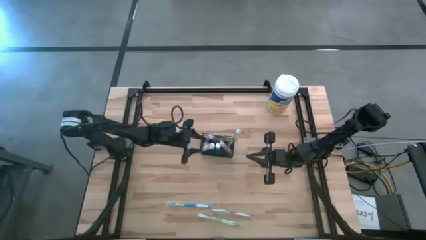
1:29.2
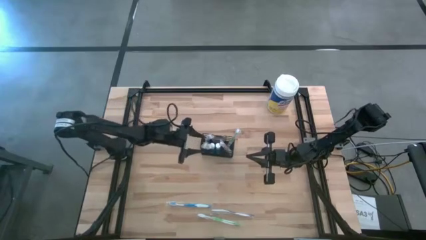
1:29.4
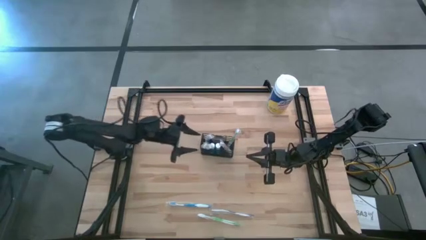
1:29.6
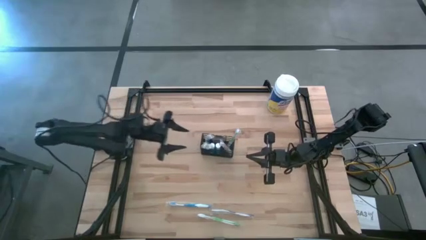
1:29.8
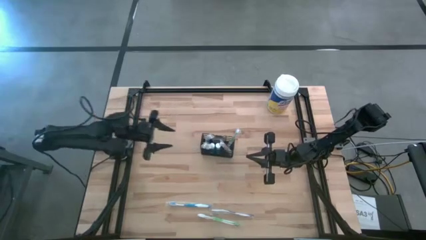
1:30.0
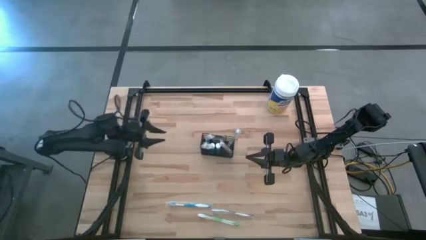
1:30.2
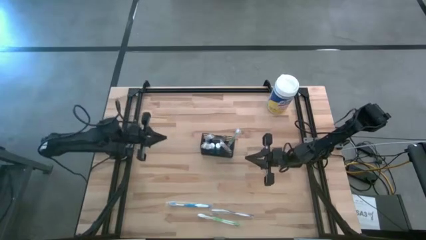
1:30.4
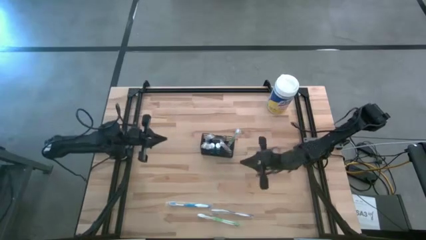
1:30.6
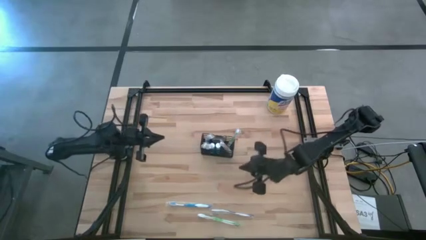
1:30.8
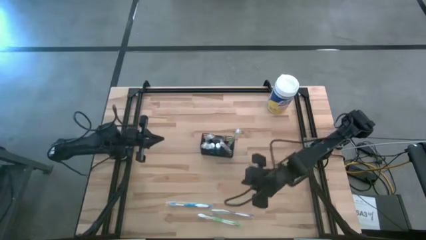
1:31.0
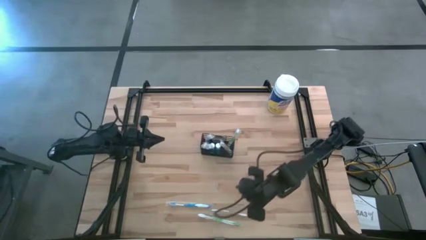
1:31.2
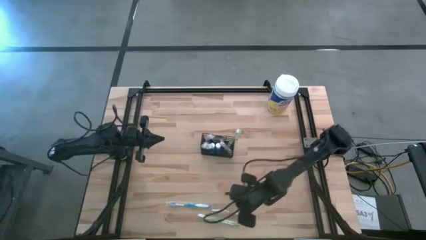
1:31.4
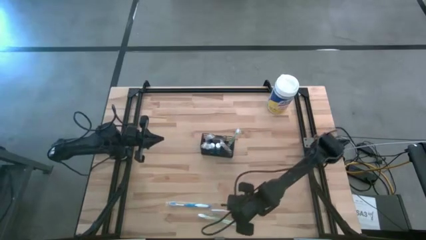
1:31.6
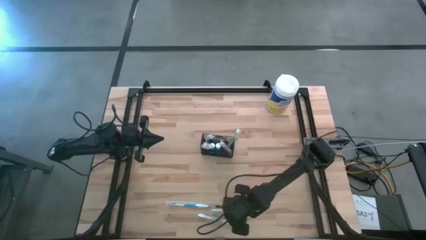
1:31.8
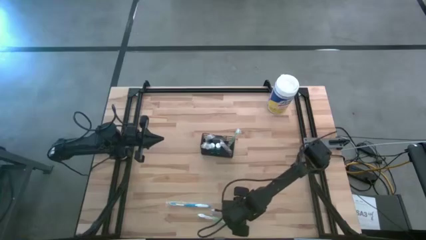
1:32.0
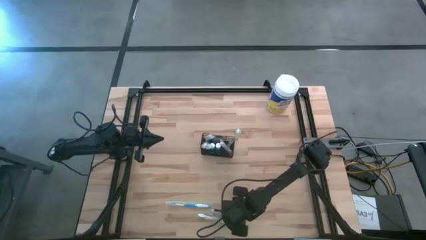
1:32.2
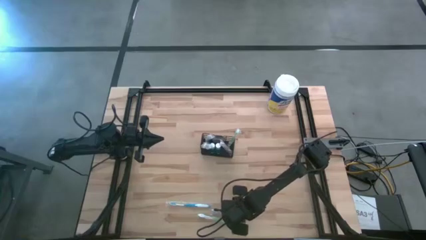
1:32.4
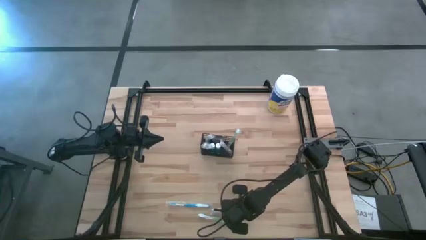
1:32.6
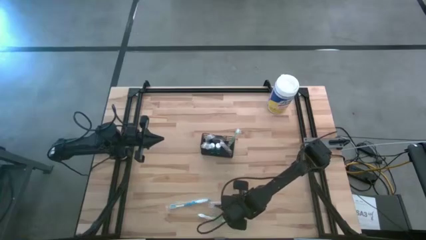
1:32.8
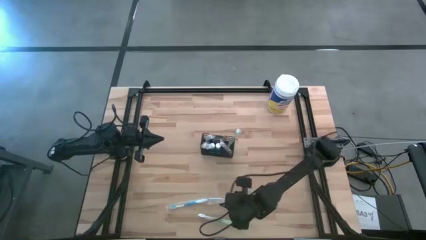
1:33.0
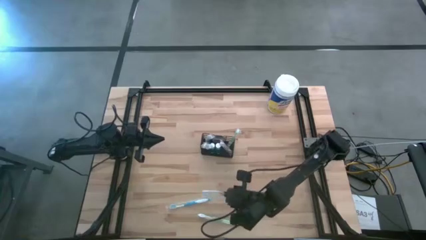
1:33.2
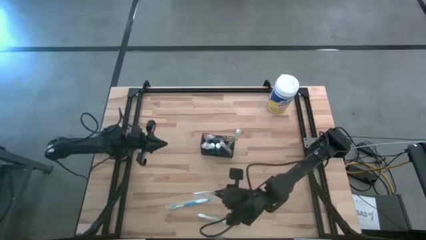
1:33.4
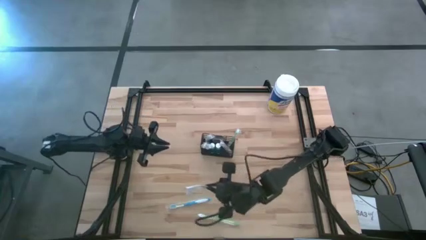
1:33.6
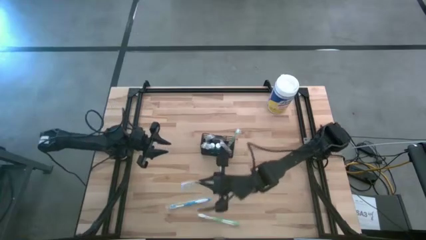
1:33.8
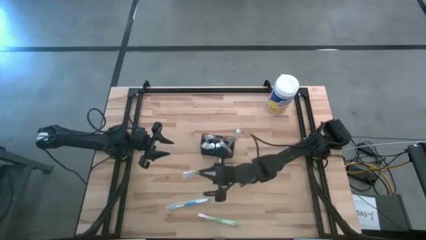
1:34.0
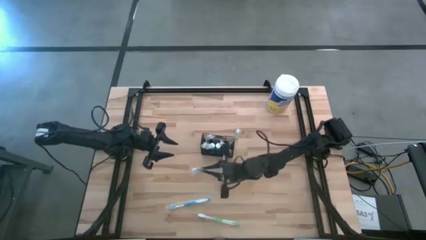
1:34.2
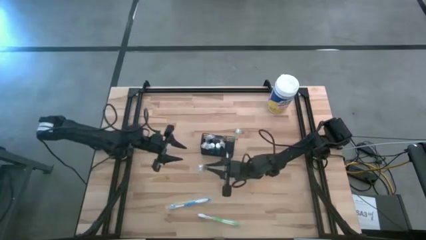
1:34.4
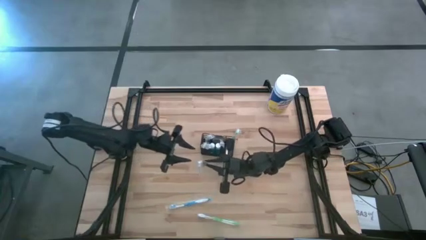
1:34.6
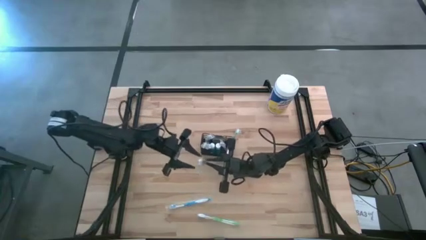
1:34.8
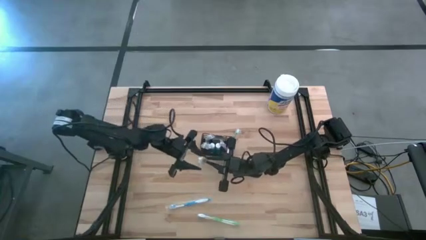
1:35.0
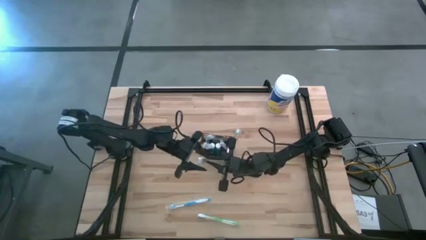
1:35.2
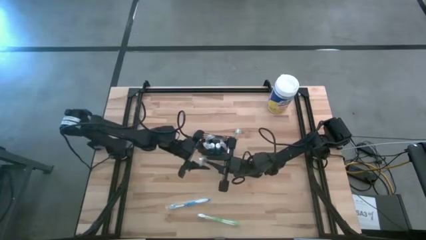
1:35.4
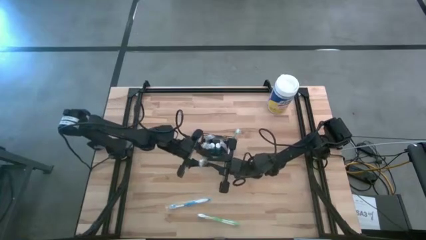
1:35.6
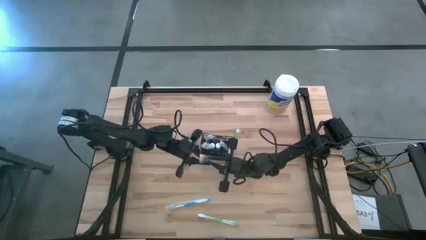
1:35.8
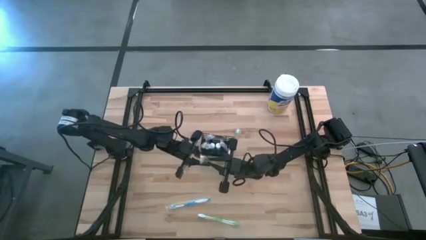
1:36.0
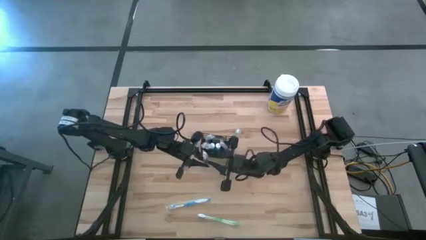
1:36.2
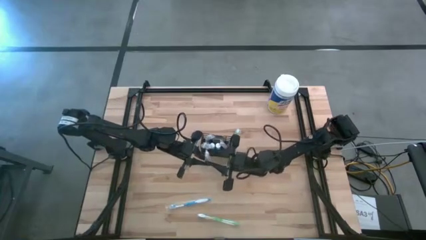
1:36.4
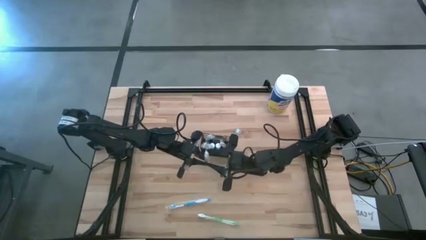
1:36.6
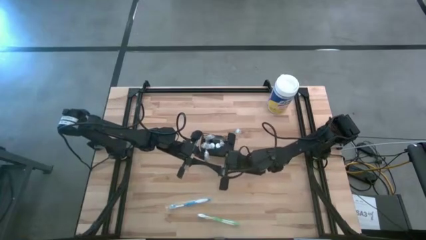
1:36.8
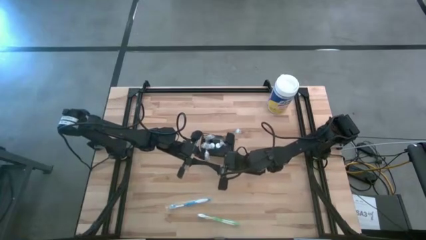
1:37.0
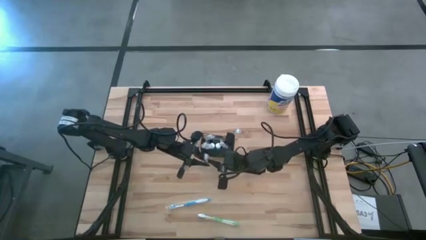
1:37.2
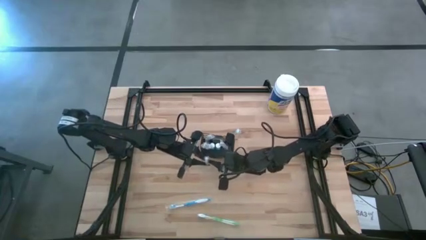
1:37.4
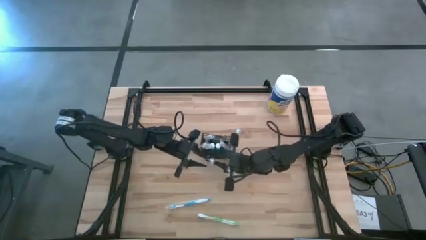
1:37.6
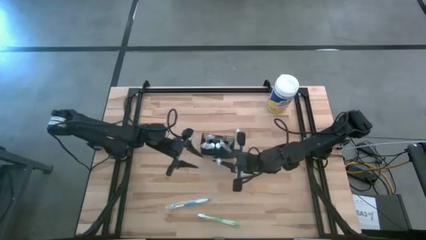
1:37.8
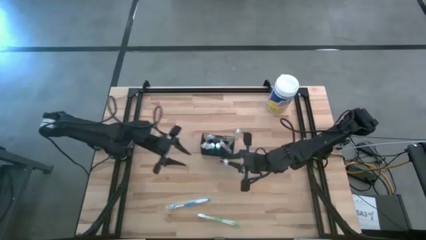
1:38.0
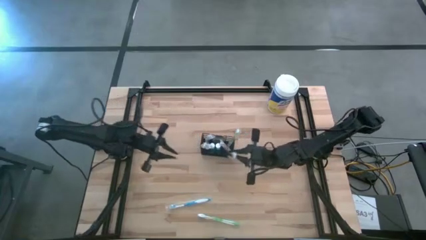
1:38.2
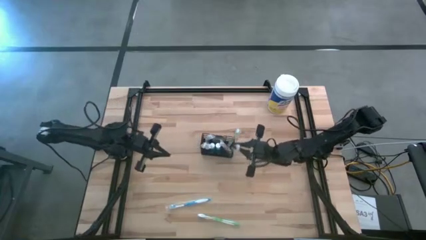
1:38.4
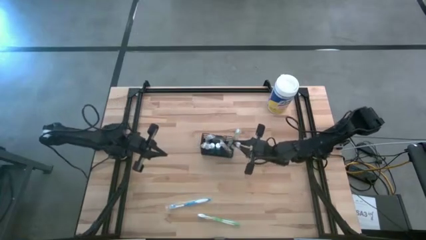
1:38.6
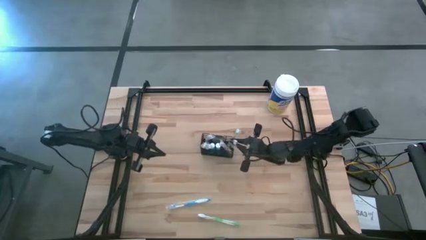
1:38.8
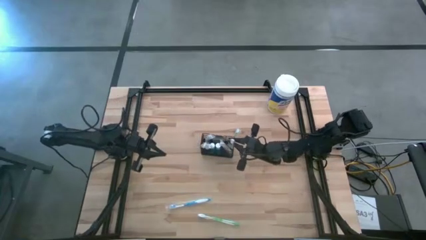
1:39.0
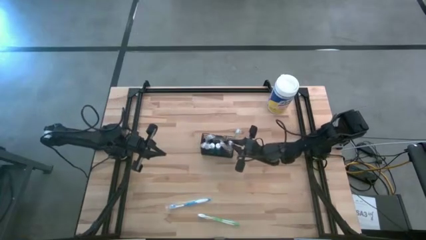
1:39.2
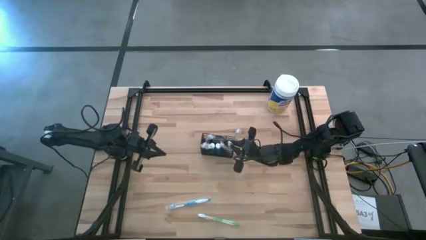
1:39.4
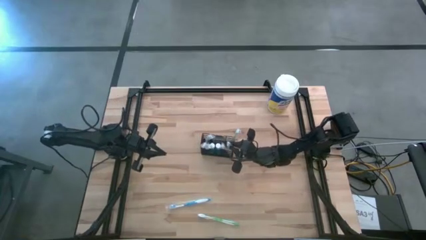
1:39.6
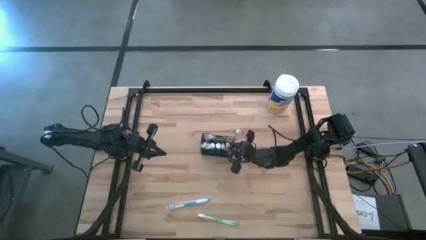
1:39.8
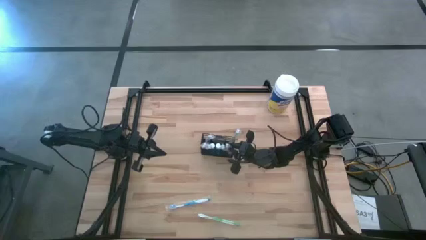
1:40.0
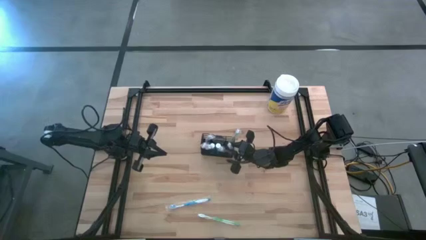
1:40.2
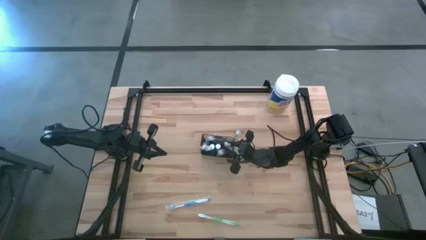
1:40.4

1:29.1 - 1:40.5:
Task: Pick & Place toothbrushing station
Put the violet toothbrush into the wire organizer

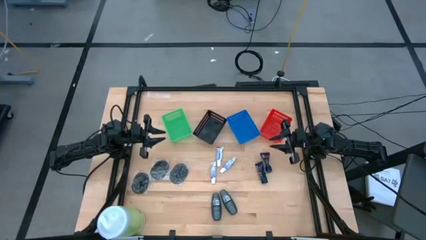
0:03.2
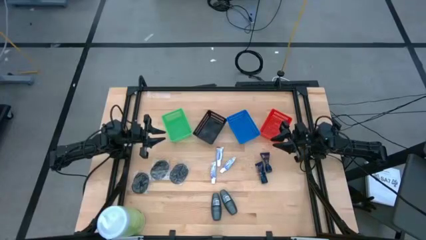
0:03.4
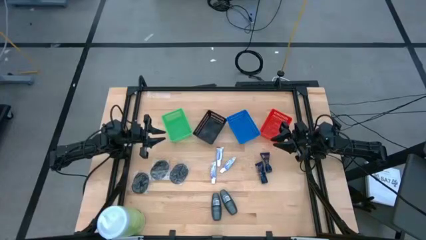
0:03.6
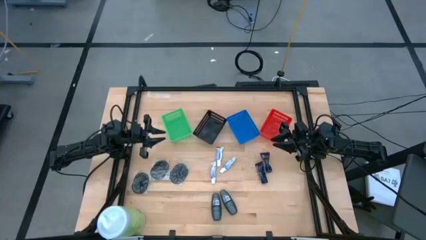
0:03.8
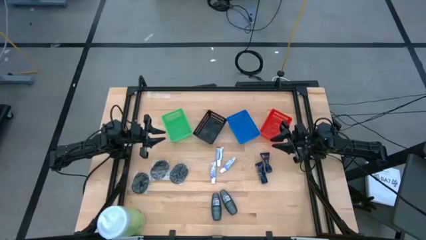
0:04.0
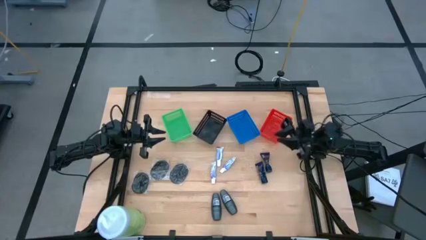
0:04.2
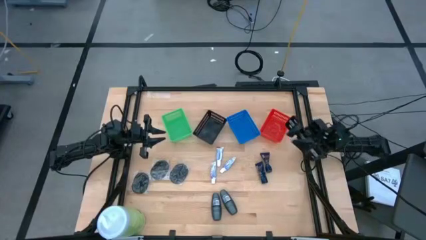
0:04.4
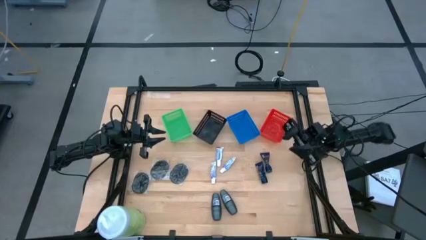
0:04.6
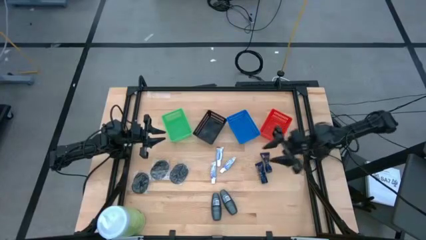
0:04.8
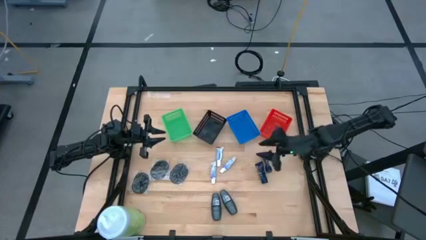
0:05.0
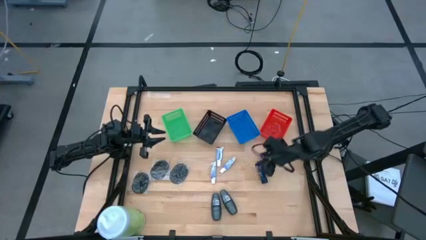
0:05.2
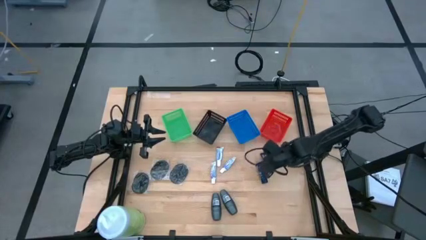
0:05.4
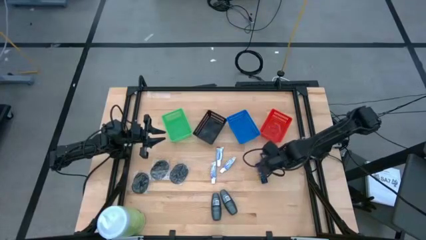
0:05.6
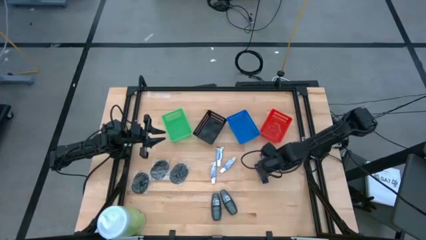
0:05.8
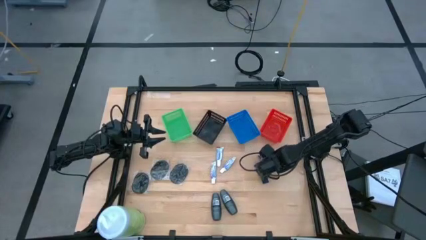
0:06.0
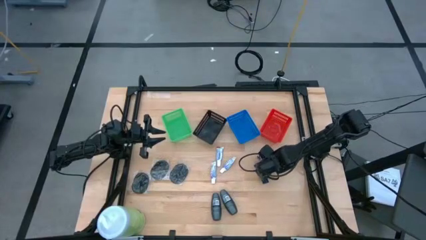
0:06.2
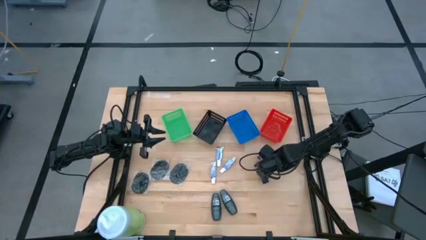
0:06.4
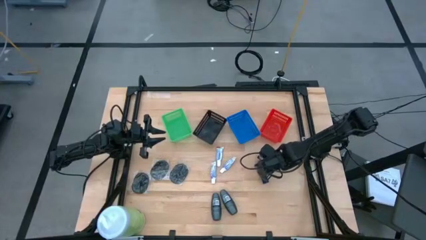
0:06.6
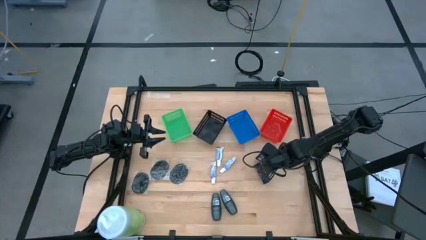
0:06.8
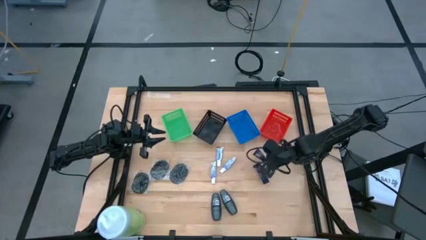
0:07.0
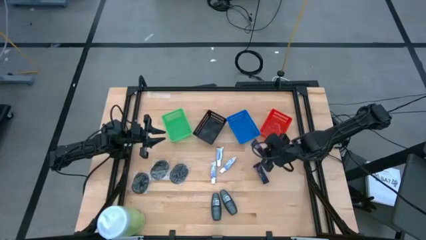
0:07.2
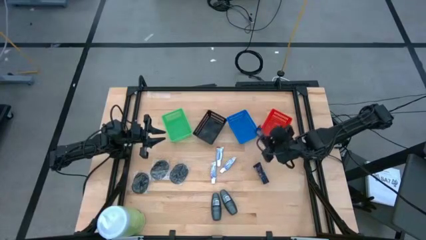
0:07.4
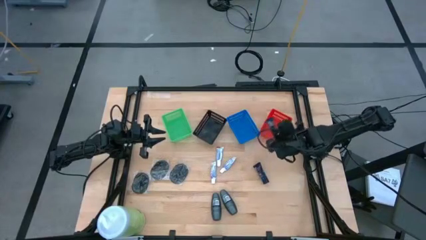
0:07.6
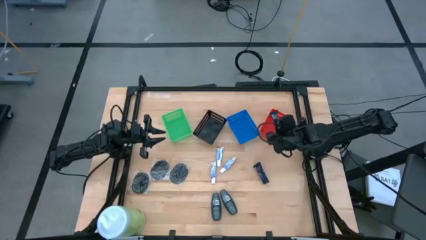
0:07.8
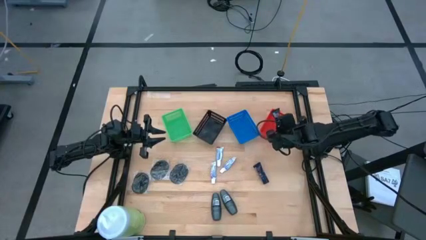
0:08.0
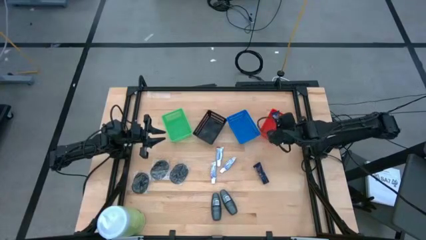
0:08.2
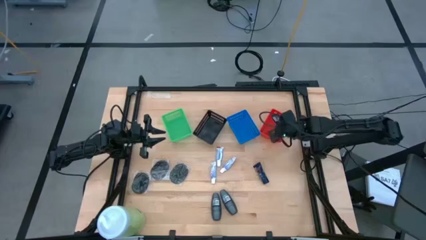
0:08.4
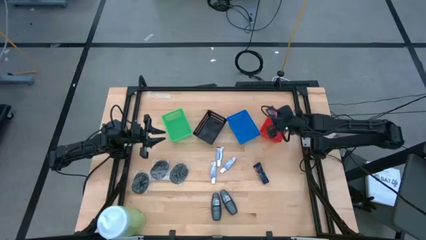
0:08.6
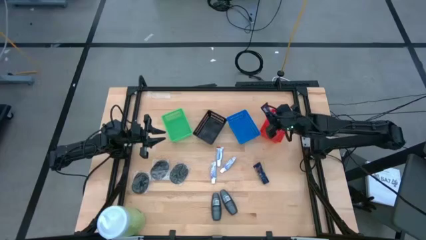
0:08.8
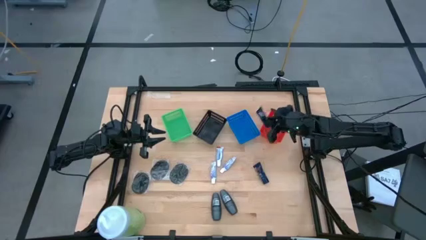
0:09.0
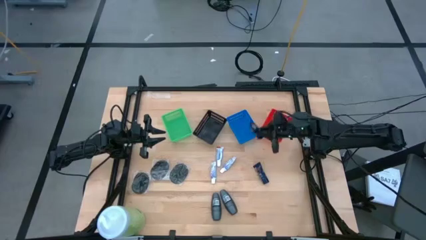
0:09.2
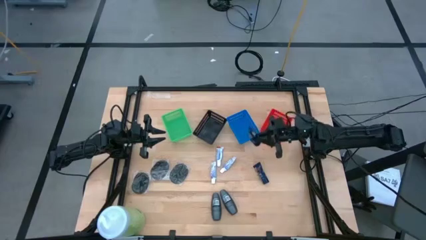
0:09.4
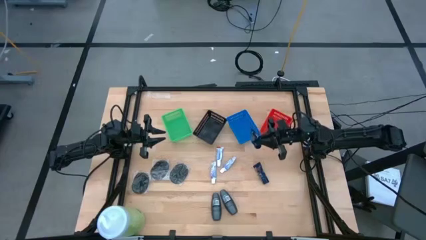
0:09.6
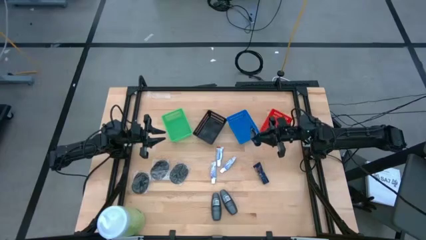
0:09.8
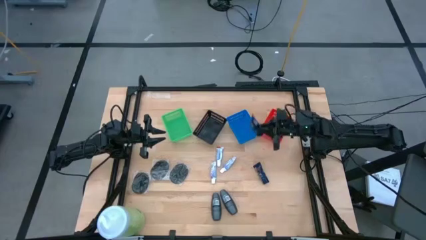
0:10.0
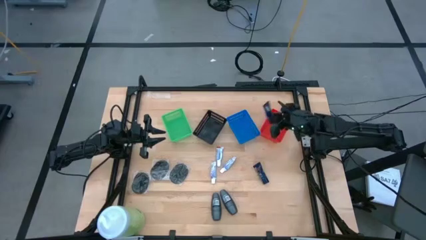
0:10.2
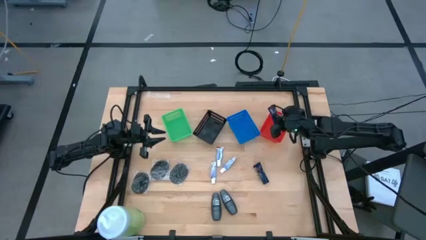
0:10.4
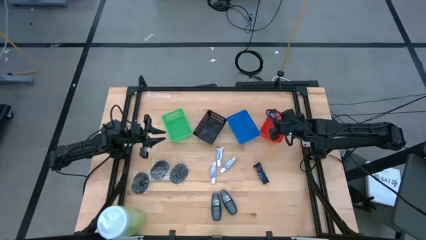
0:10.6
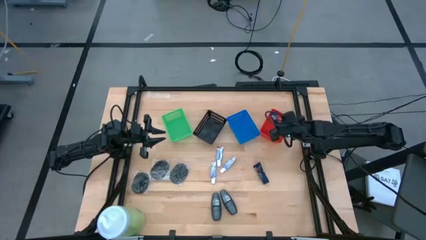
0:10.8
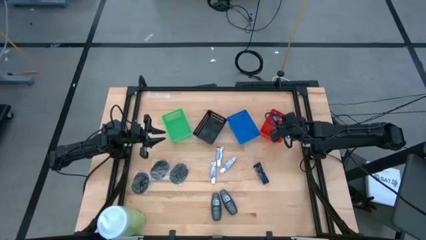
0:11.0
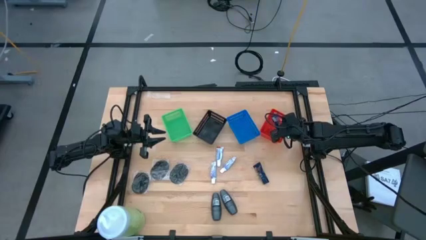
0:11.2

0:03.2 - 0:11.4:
Task: Pick & Place Travel size toiletries
Put the right blue shave cream into the red bin
